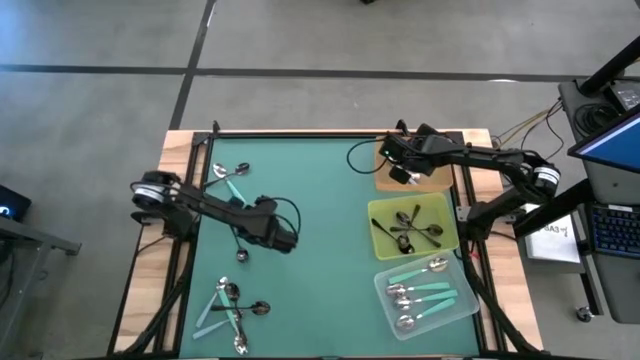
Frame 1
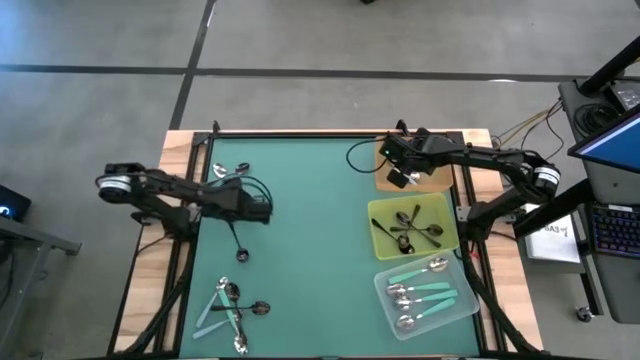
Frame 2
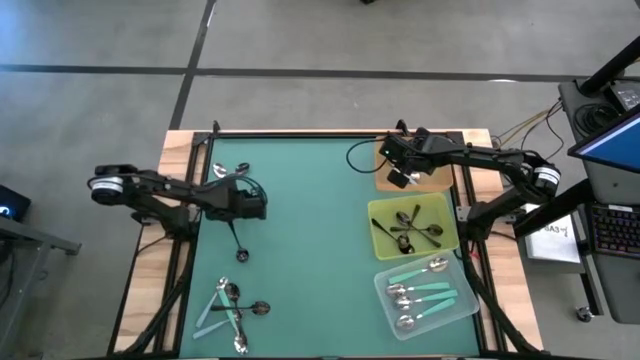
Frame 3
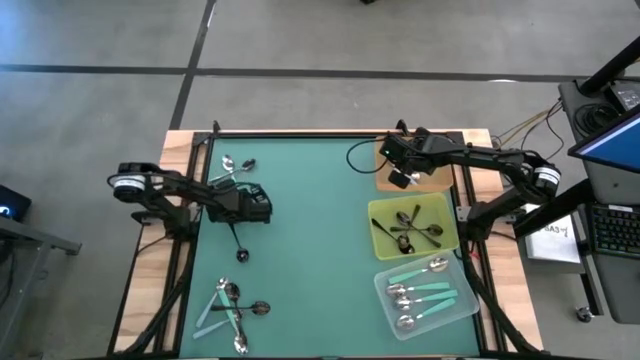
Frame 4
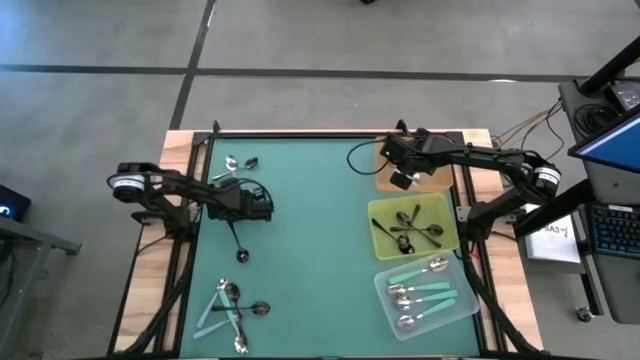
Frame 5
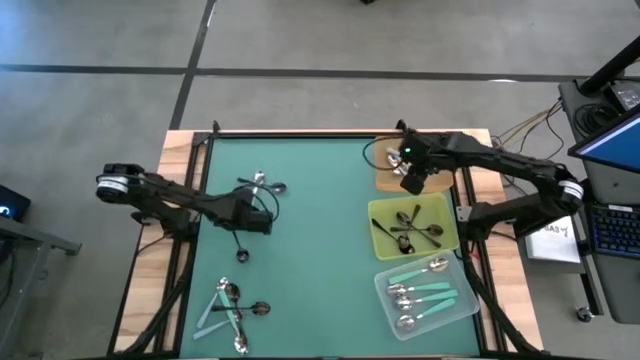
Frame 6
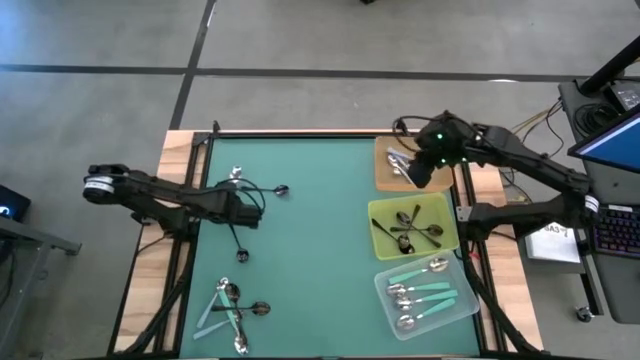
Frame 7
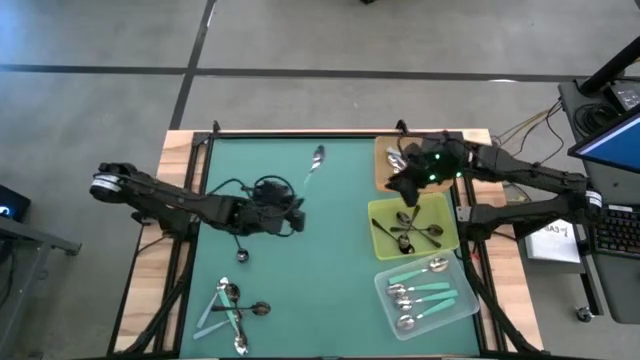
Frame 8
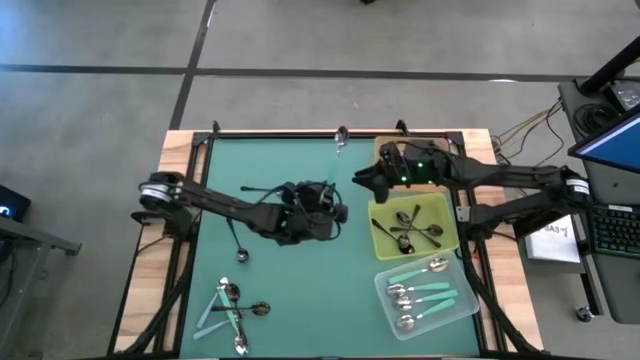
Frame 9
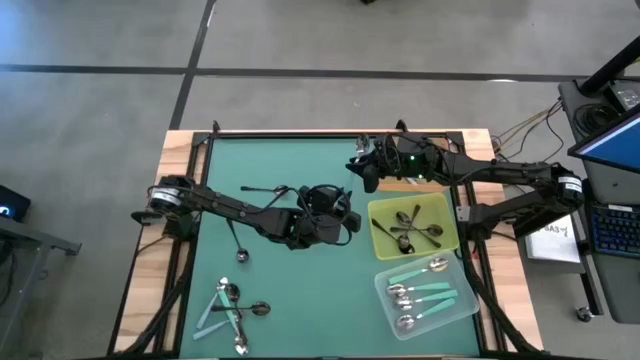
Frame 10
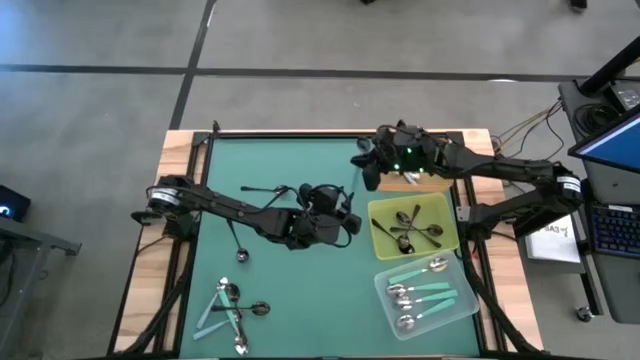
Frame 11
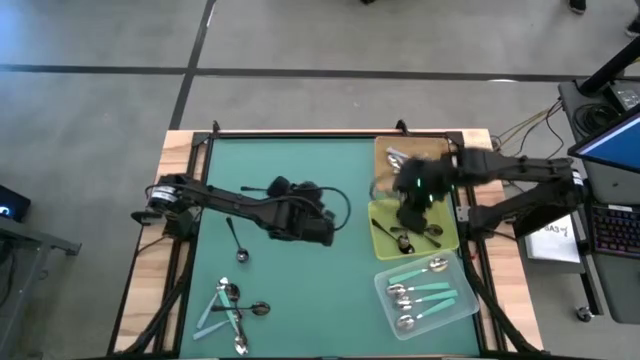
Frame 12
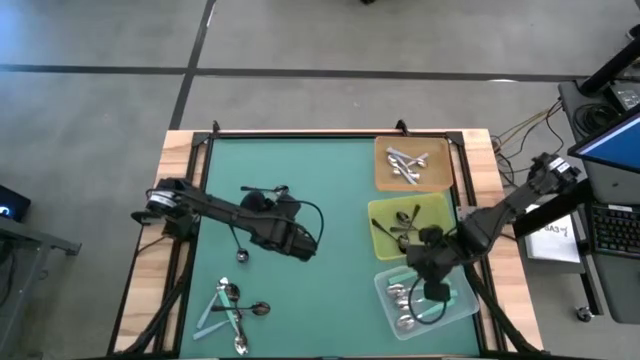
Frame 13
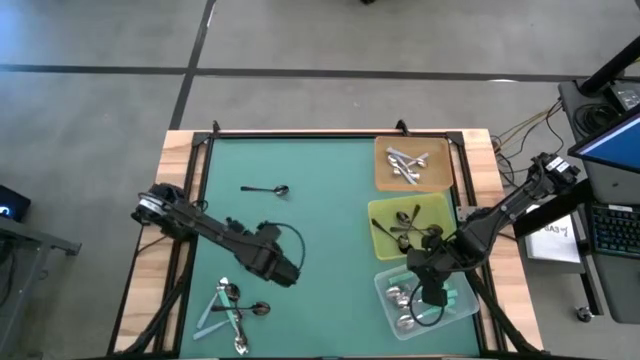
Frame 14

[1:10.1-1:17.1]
Task: Sort silverware by color (type)
Put the green spoon into the transparent bin

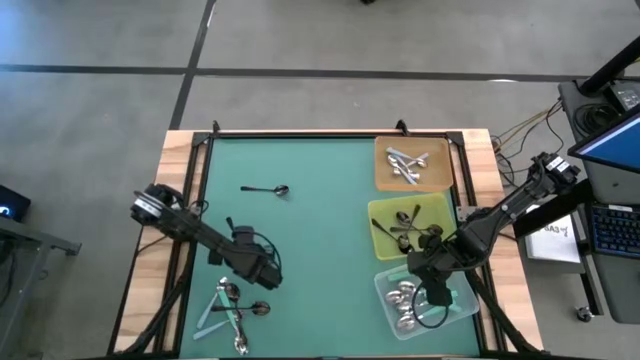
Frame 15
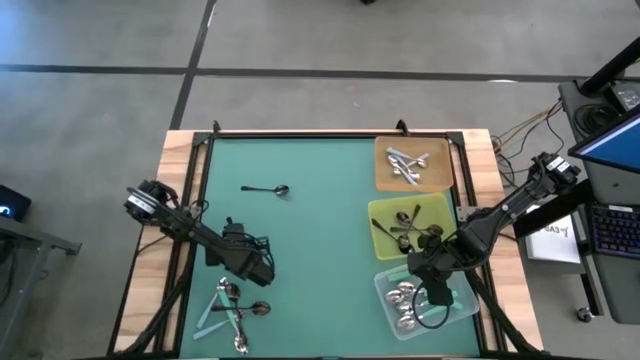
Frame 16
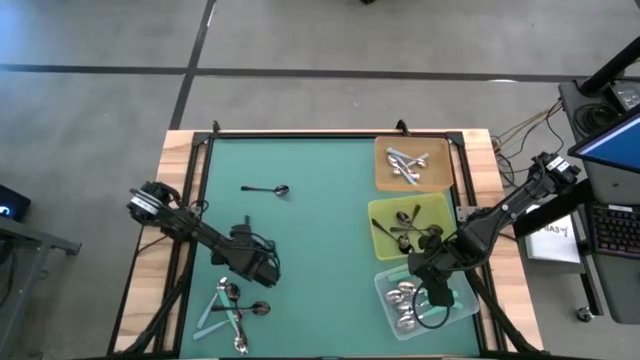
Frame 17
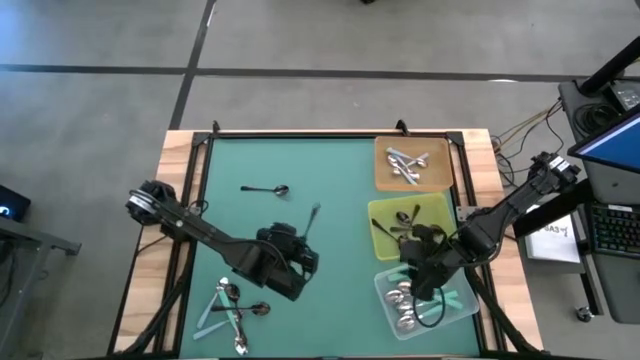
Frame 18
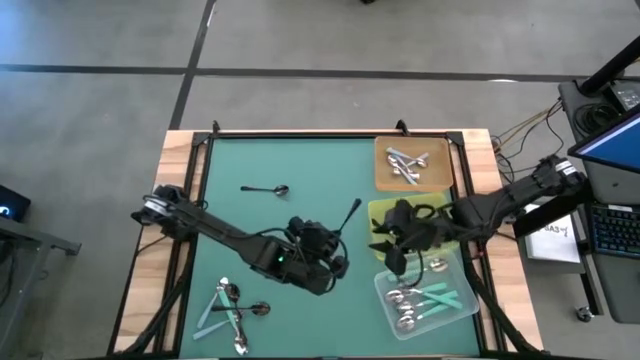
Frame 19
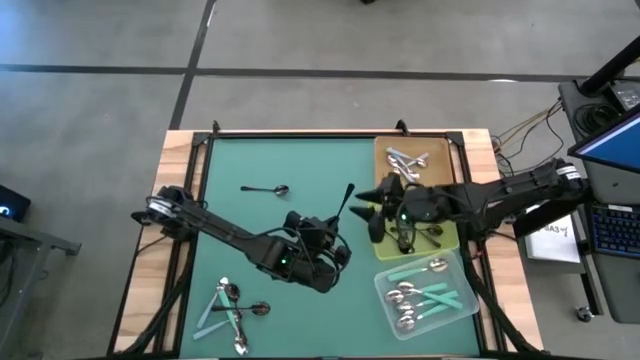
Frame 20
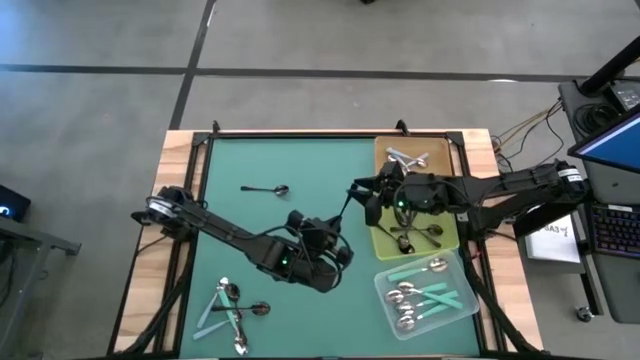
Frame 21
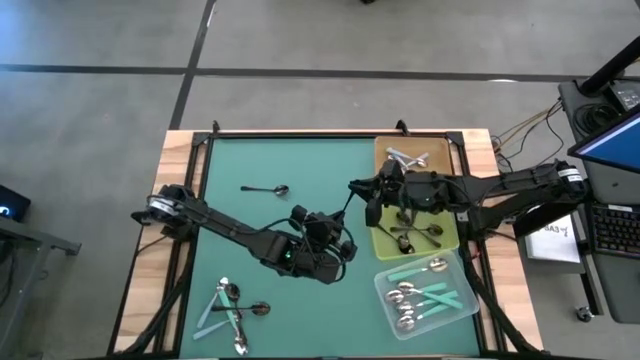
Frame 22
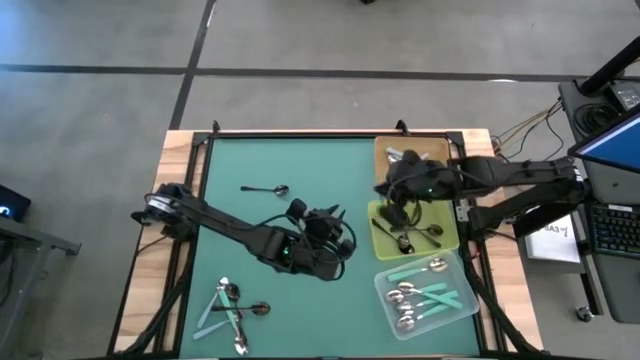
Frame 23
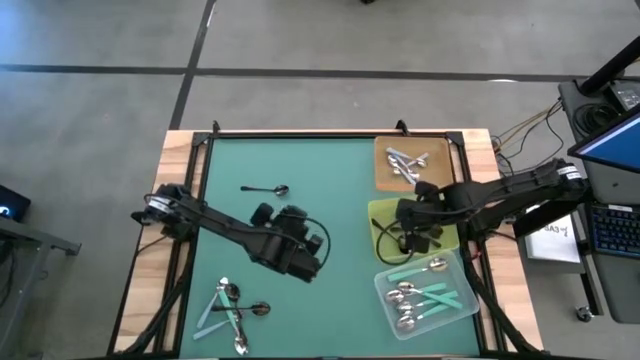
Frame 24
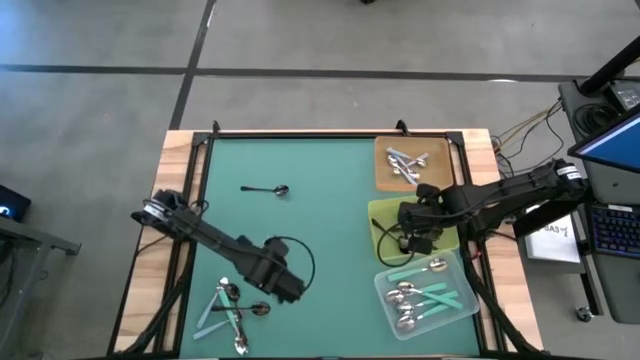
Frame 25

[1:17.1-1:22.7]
Put the black spoon into the yellow bin

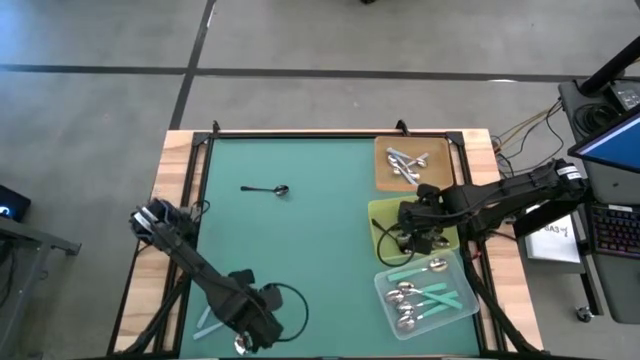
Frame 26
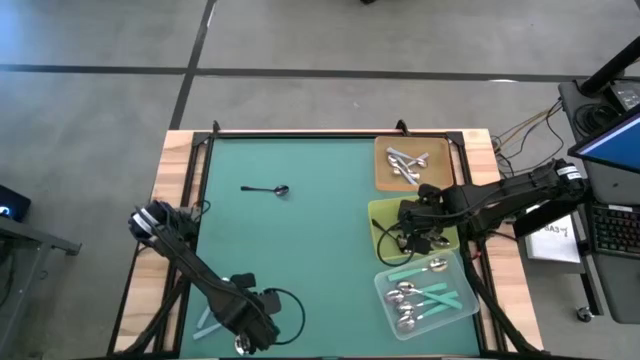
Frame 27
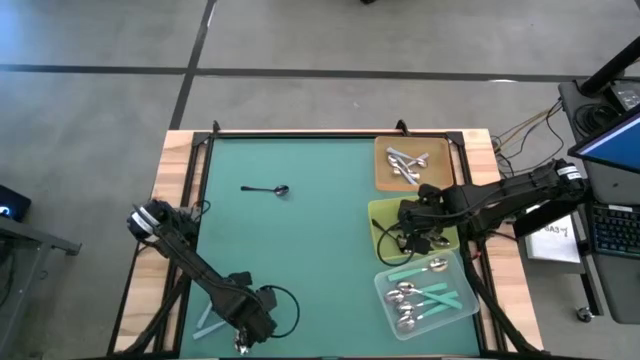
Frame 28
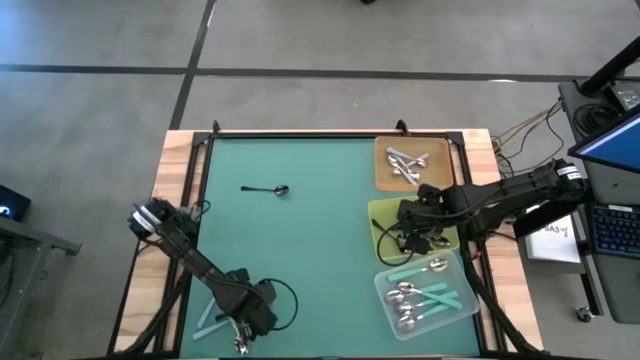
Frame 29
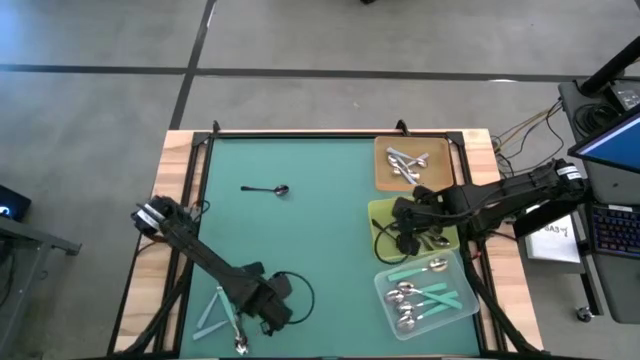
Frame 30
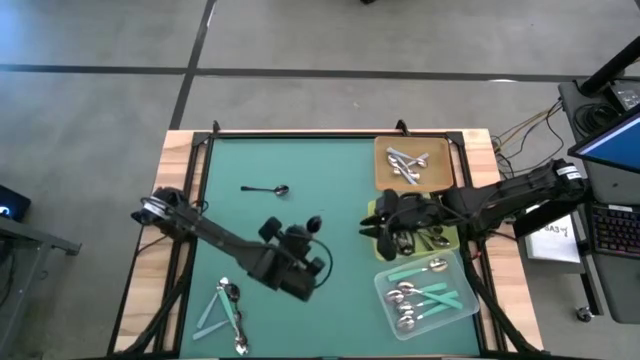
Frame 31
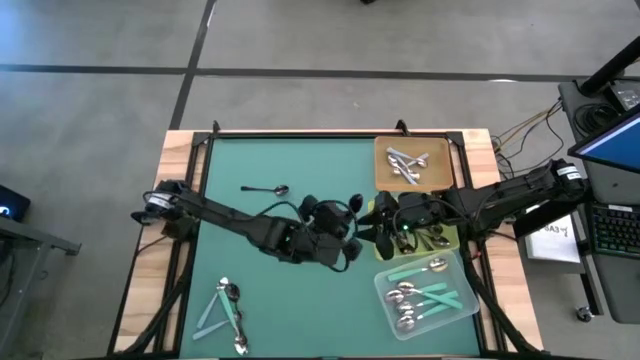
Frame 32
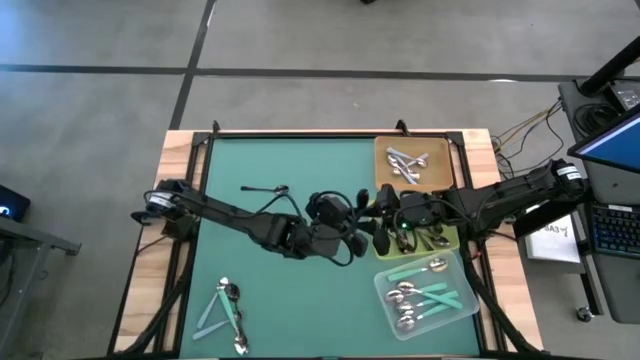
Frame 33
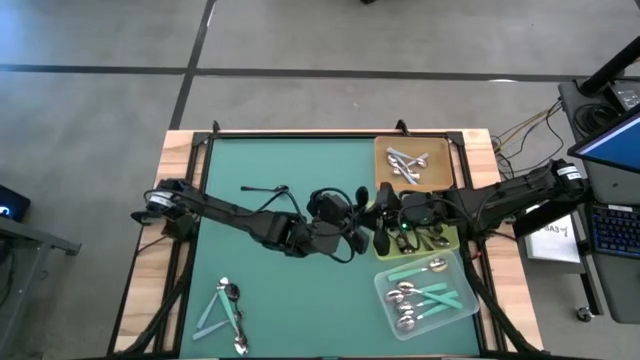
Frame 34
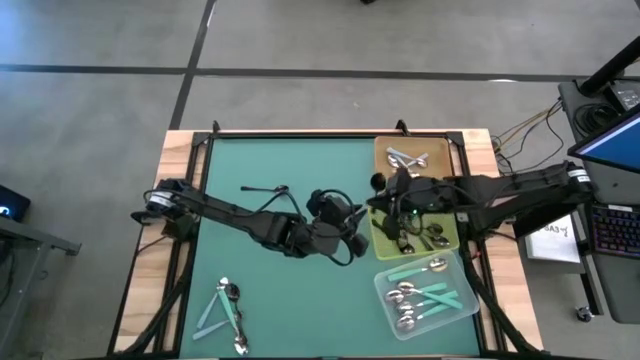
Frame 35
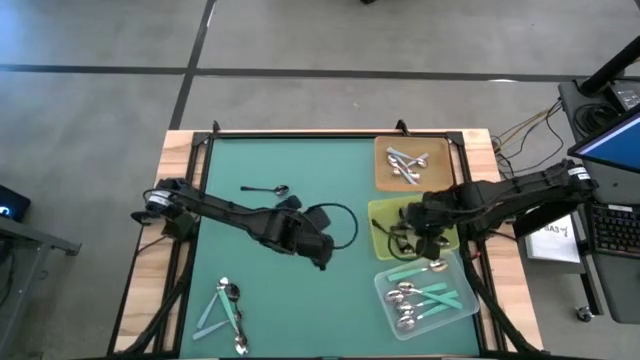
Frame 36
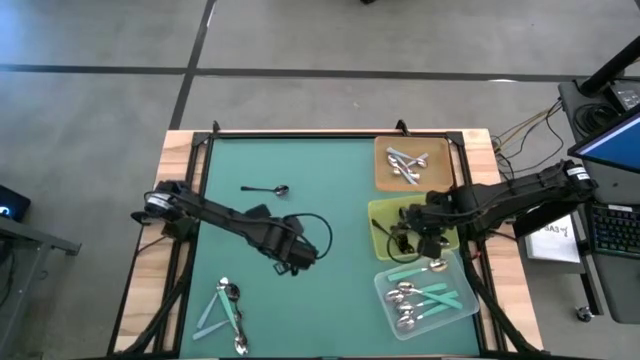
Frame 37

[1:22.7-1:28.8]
Put the black spoon into the yellow bin

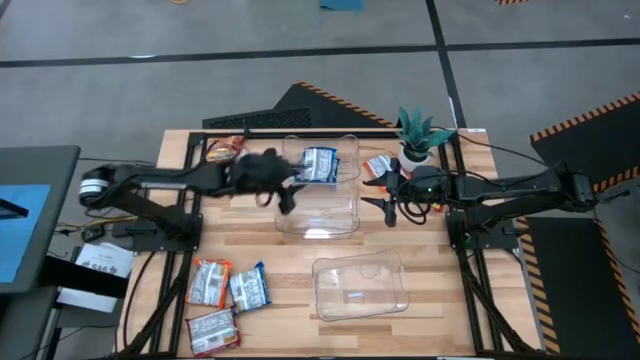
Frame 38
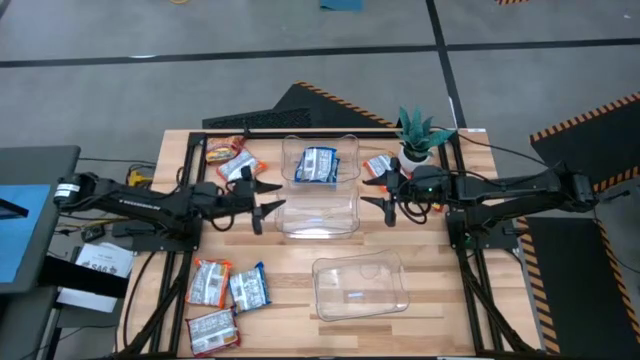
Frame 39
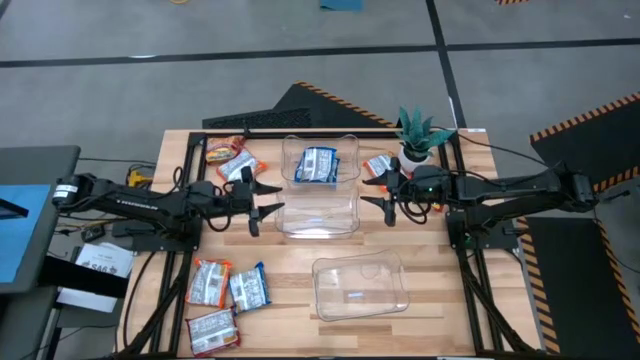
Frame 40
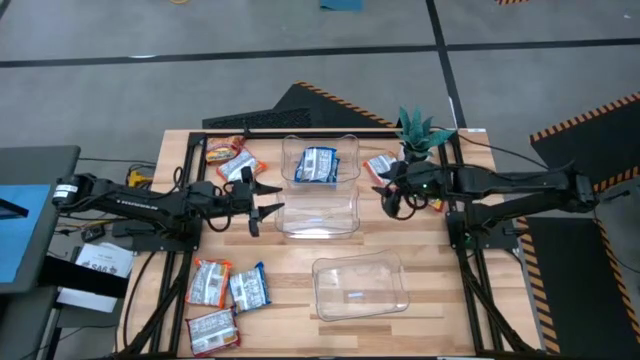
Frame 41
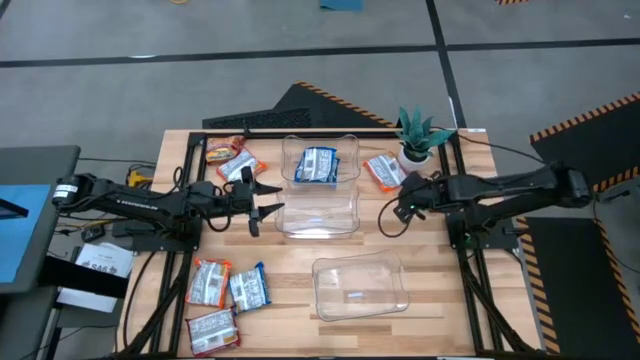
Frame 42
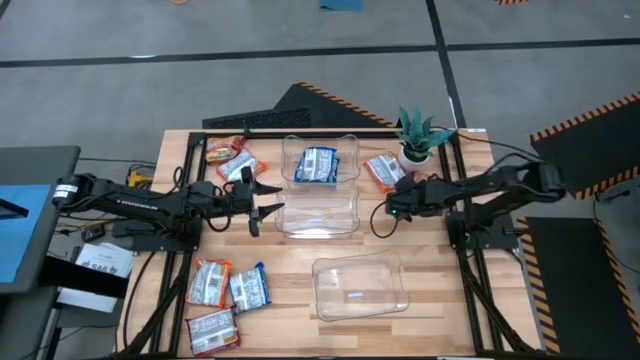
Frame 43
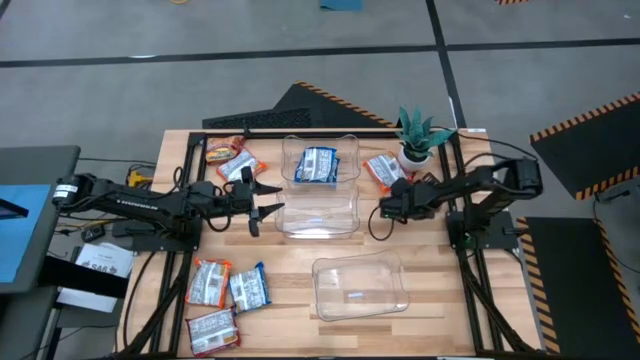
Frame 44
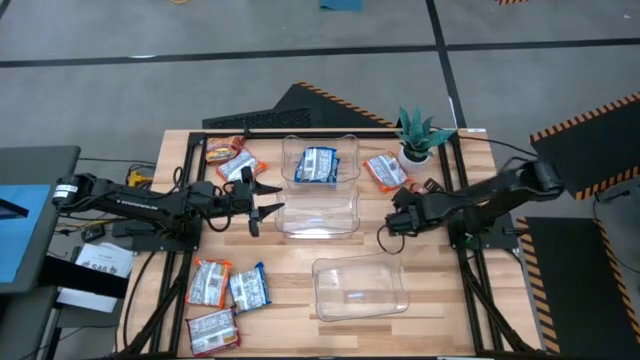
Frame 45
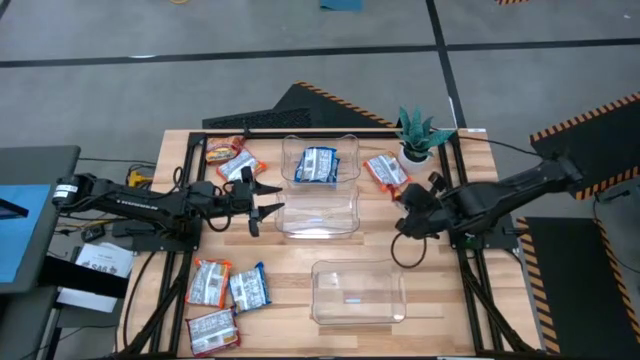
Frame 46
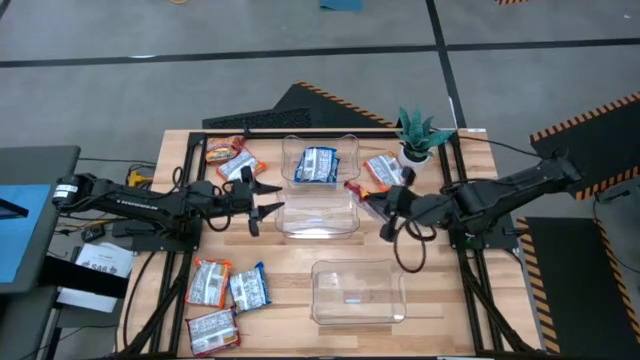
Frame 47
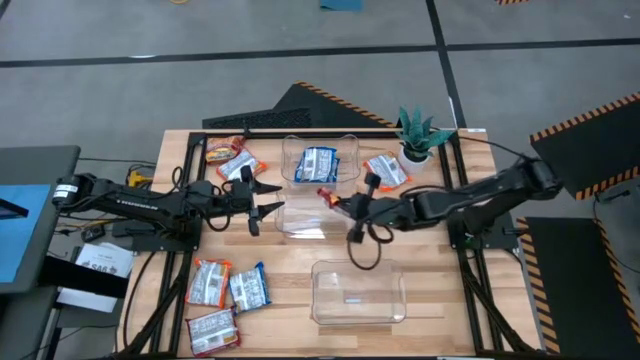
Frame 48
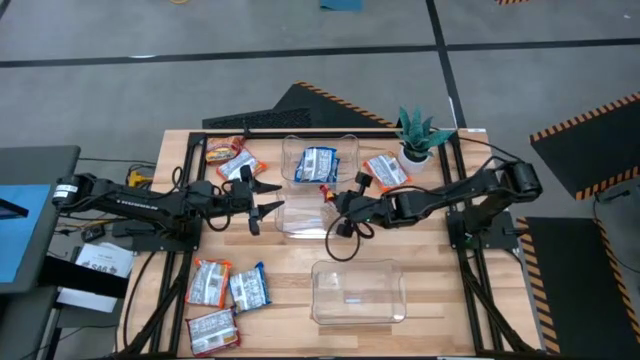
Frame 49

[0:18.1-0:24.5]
Task: Sort Maruchan noodles
Put the middle red noodle pack into the middle transparent bin
